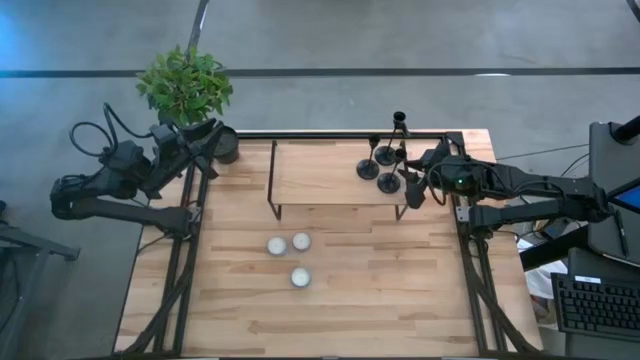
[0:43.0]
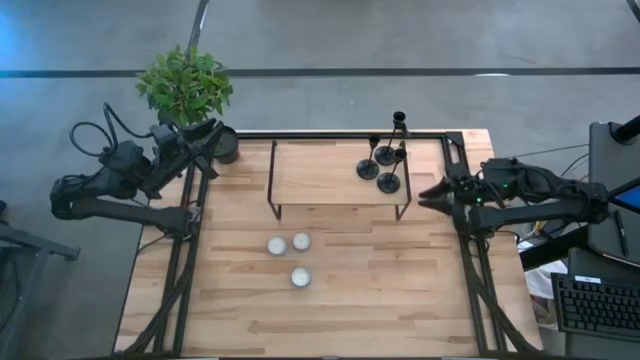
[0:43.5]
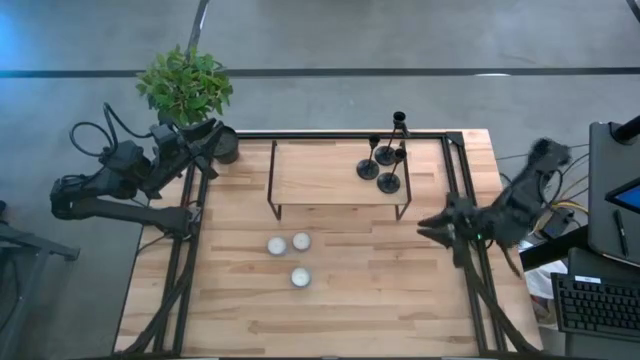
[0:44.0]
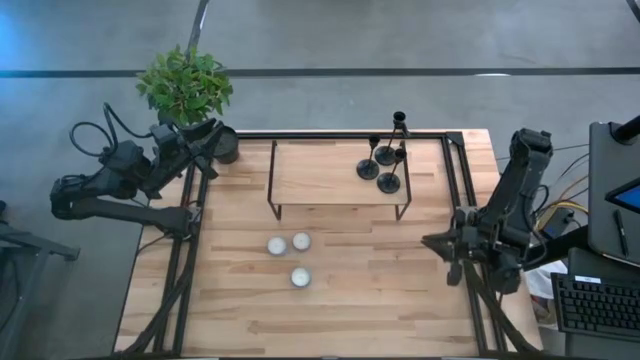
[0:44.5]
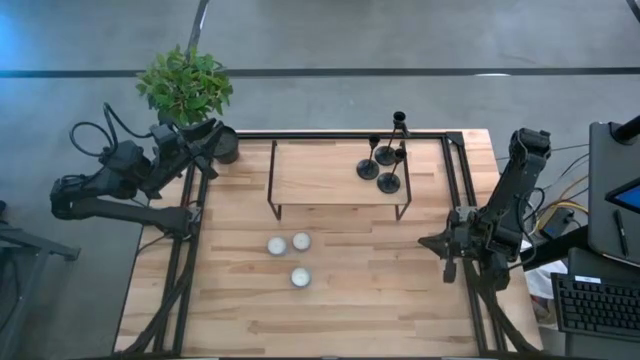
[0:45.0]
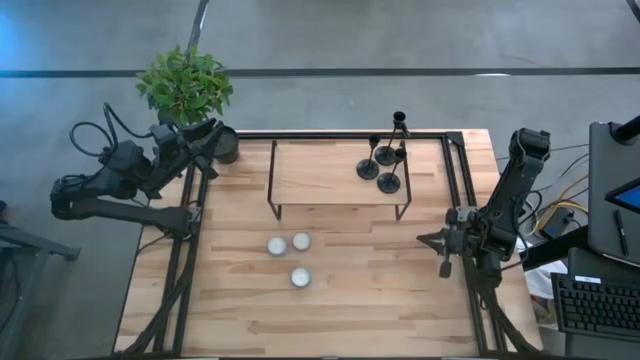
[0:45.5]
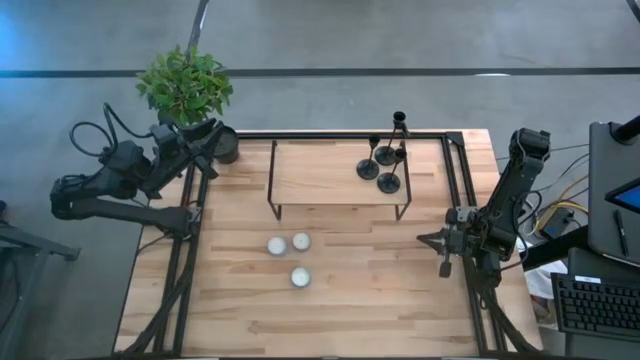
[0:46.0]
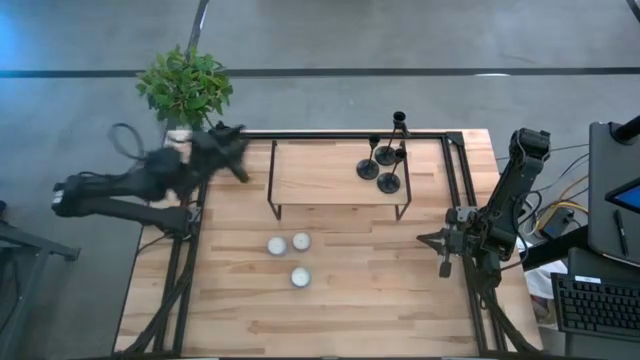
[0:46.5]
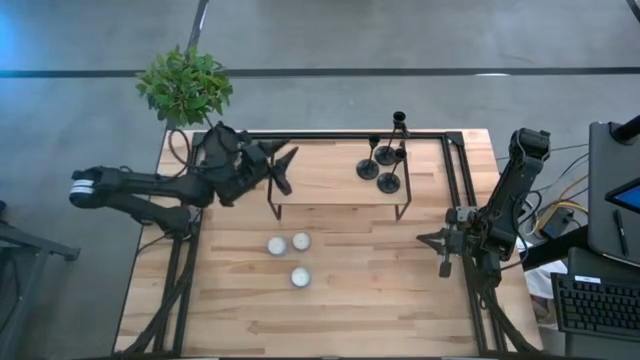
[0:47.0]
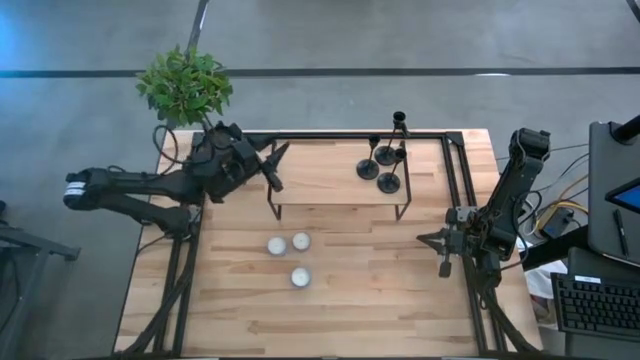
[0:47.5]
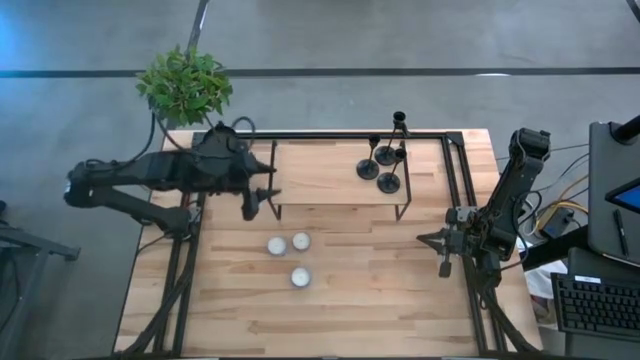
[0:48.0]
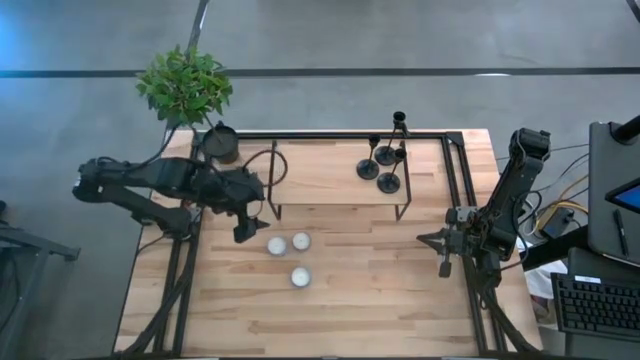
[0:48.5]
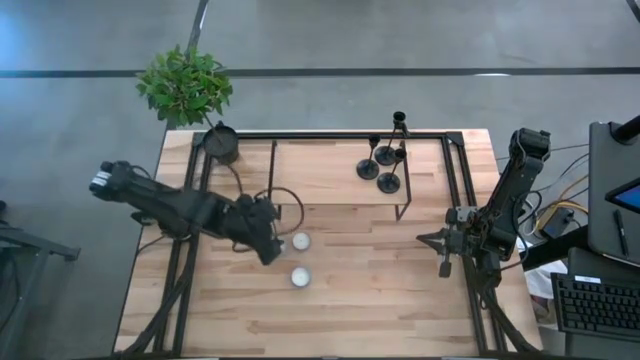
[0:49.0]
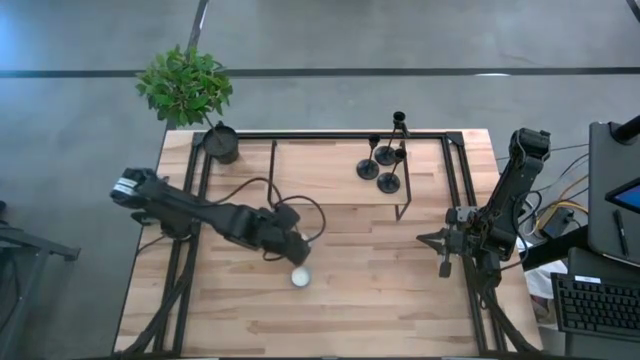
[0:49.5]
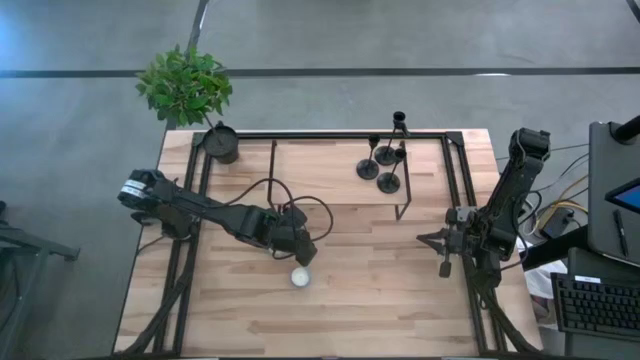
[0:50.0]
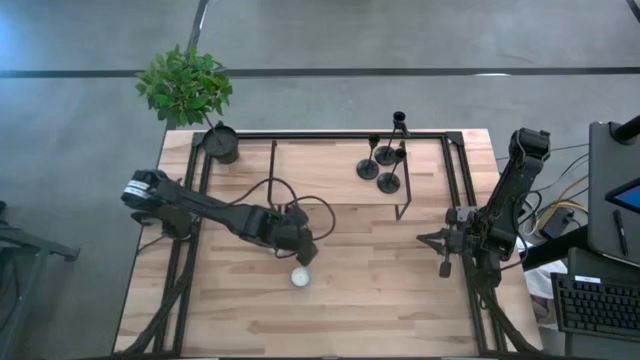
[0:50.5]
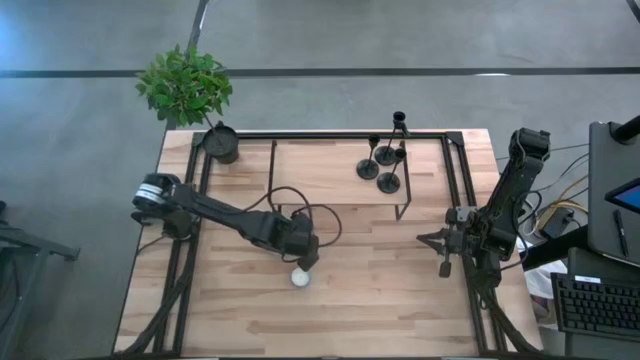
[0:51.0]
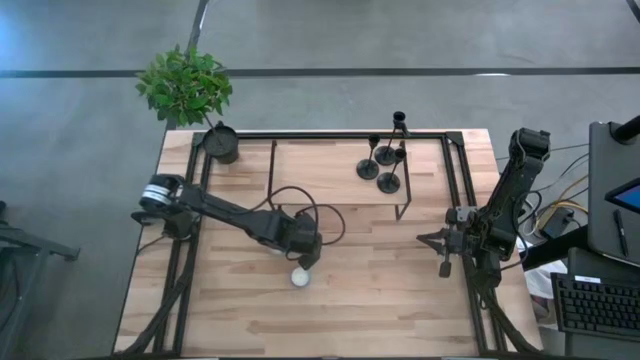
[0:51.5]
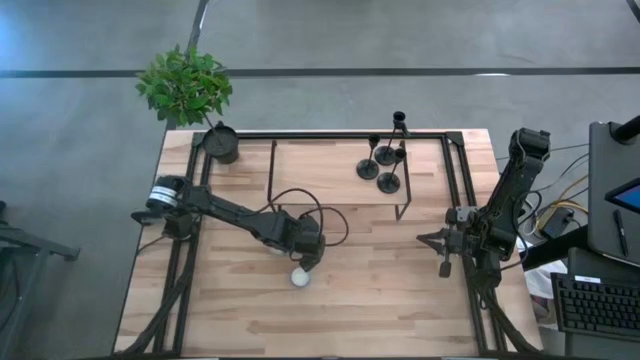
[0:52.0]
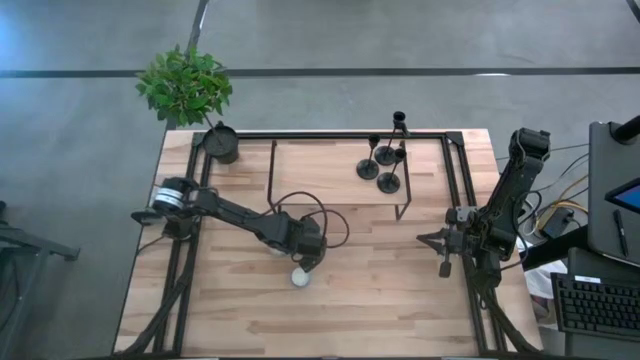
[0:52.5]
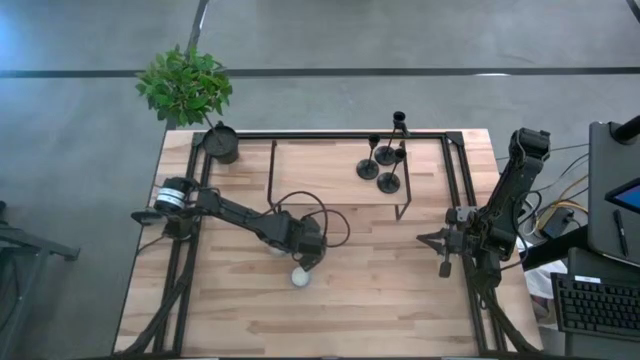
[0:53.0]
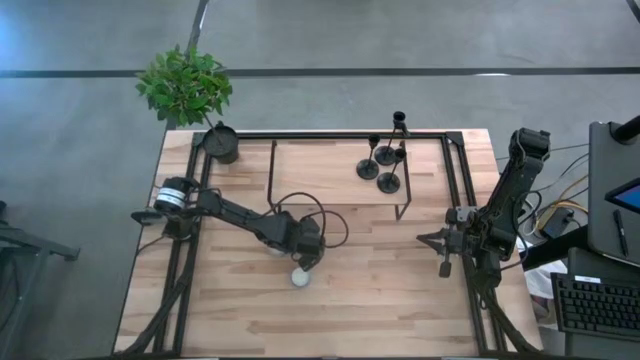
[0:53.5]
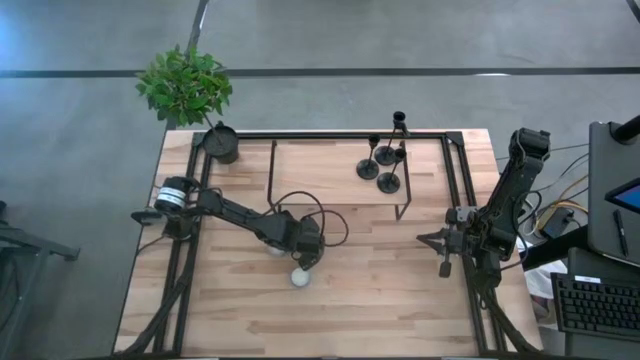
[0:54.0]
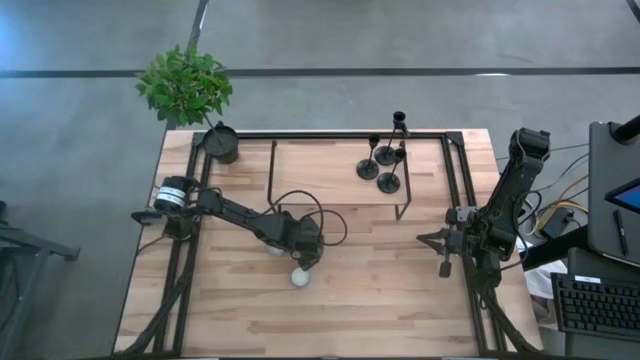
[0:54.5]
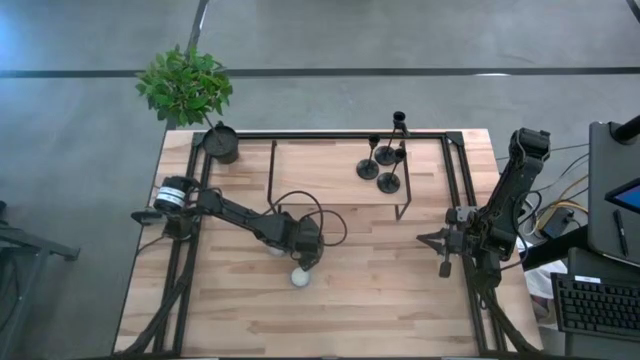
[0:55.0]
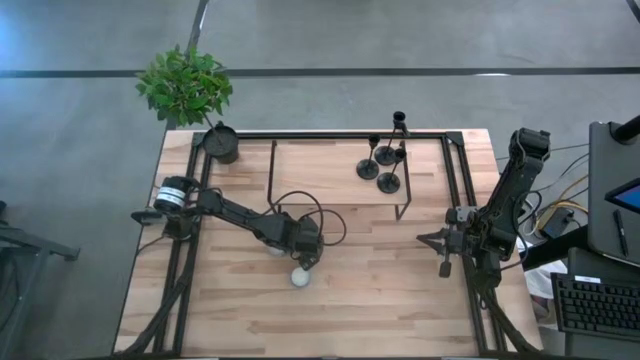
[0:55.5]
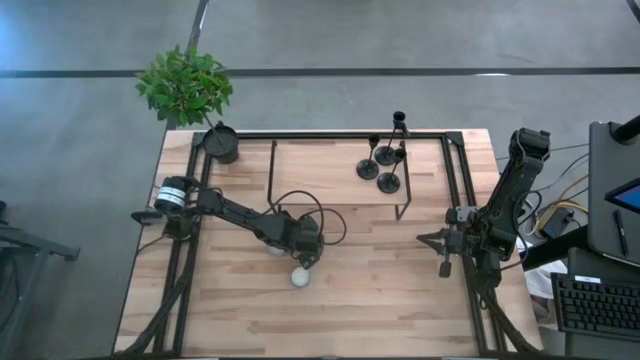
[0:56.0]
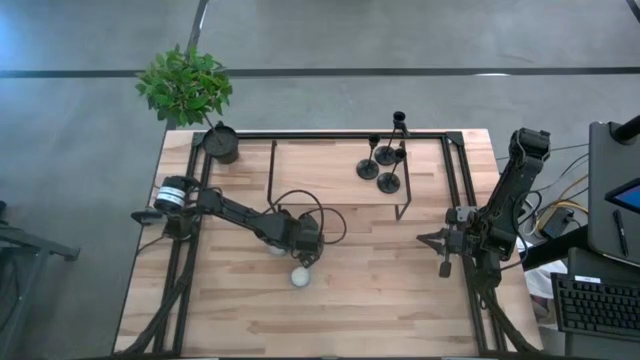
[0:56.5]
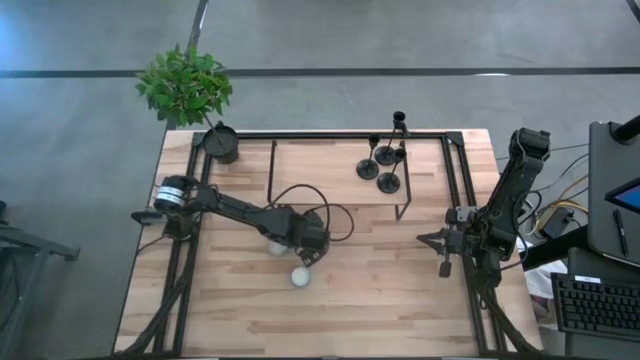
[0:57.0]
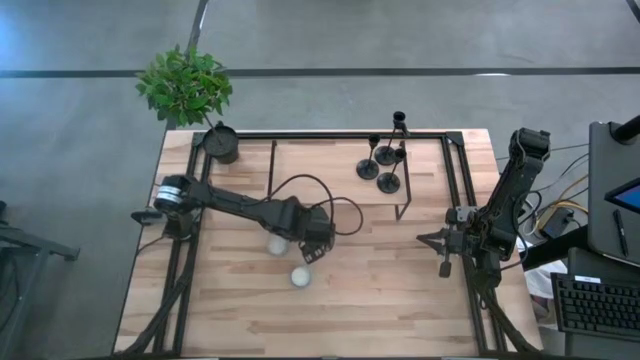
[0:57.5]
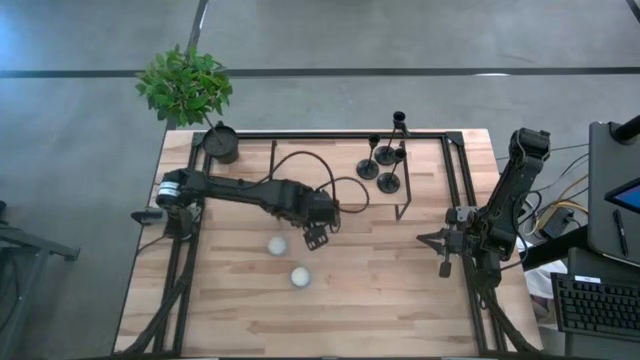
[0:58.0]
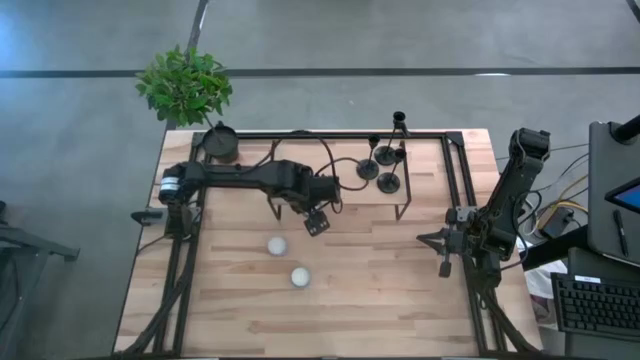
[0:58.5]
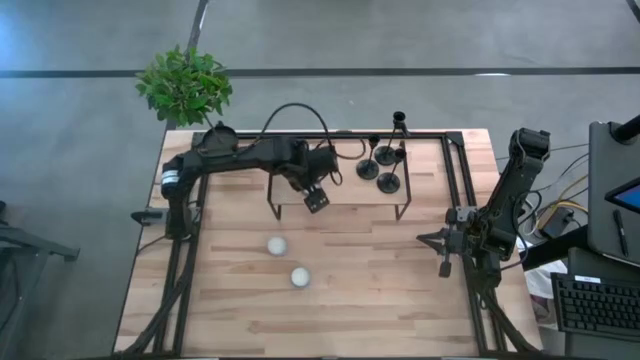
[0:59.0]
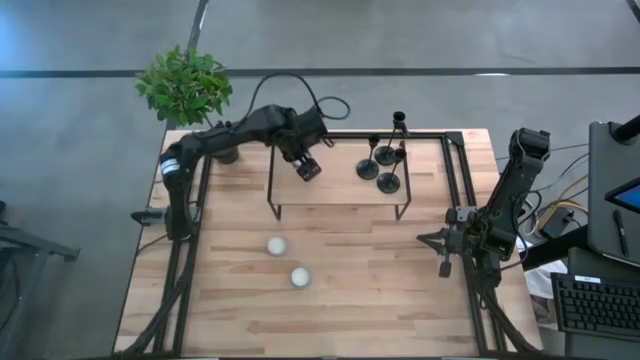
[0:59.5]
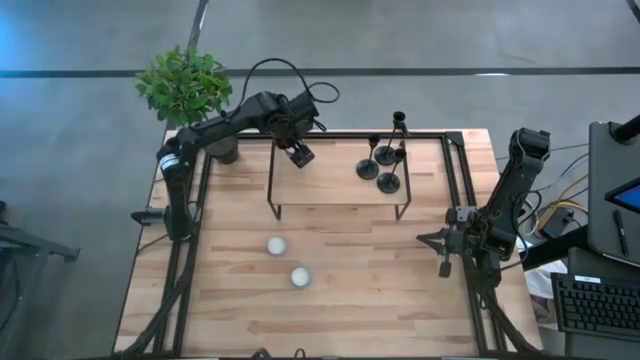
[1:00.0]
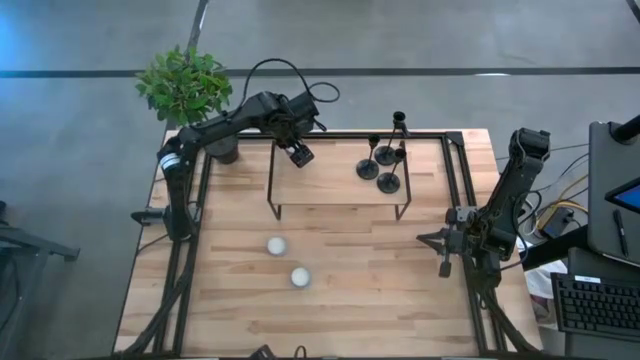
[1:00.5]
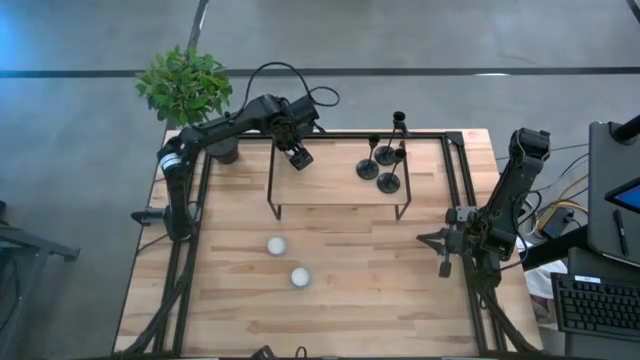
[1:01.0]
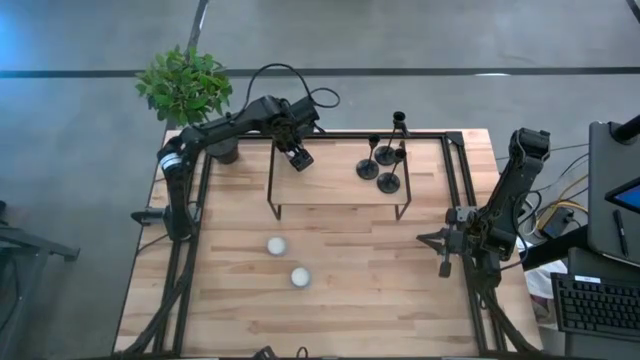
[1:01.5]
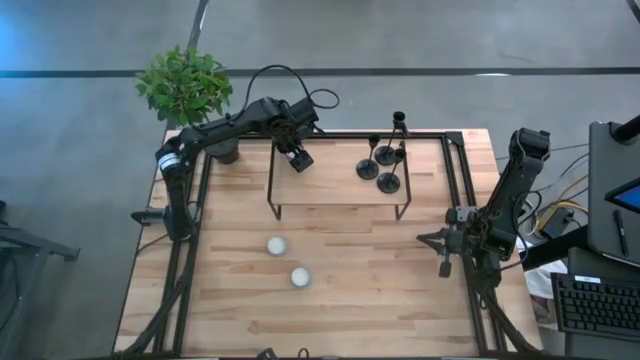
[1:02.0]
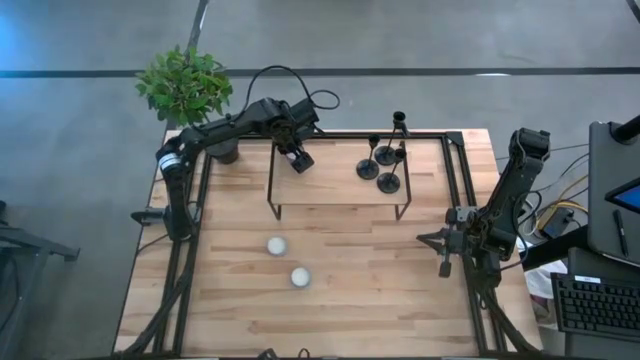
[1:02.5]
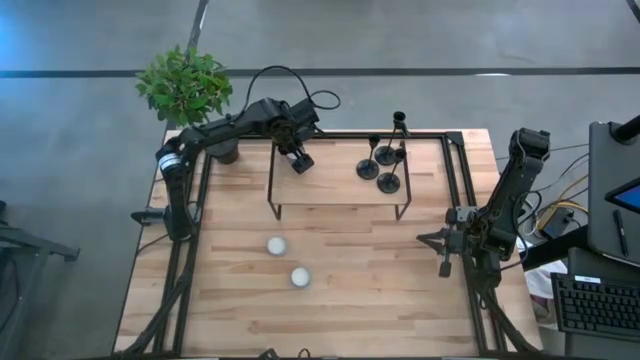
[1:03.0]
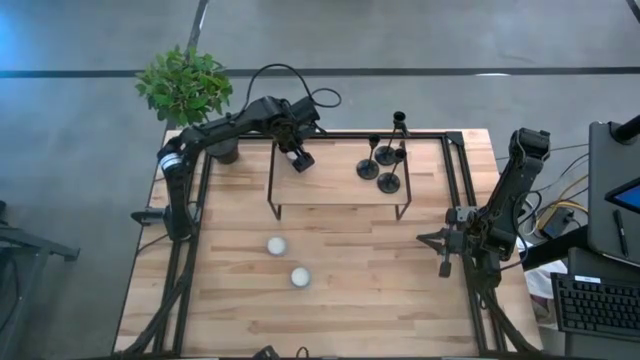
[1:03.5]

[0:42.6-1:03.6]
Task: Pick & Place candle stick holders
Put the pink scented candle on the shelf

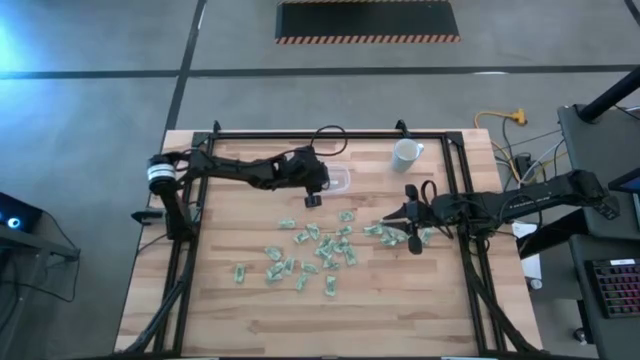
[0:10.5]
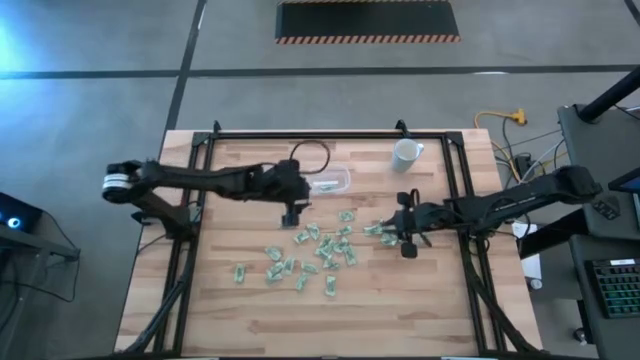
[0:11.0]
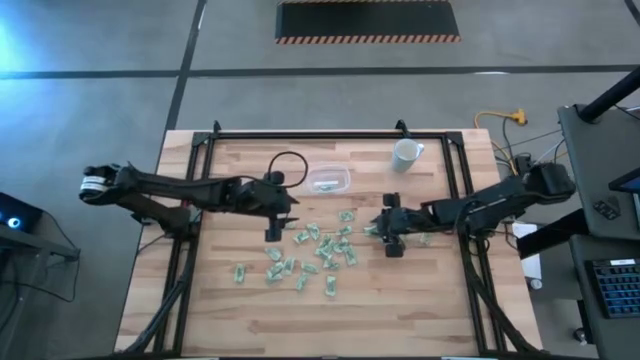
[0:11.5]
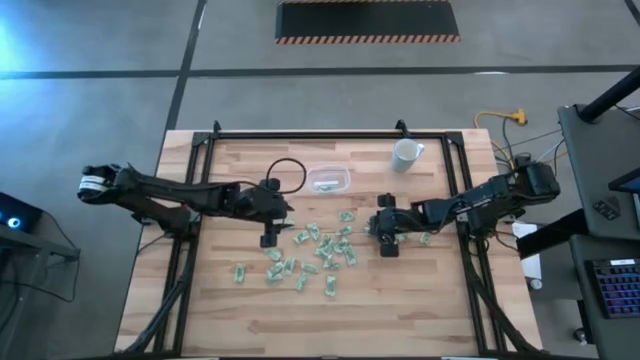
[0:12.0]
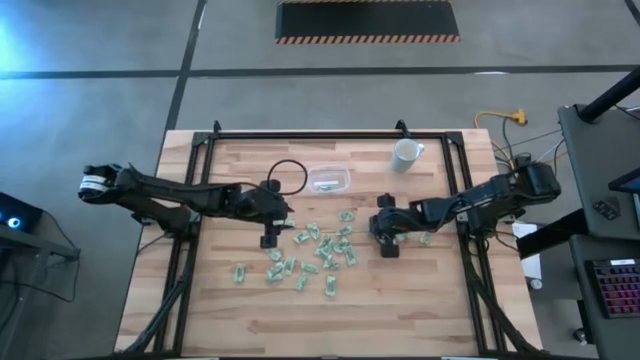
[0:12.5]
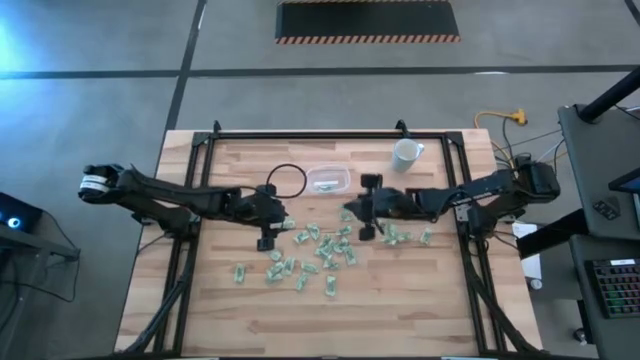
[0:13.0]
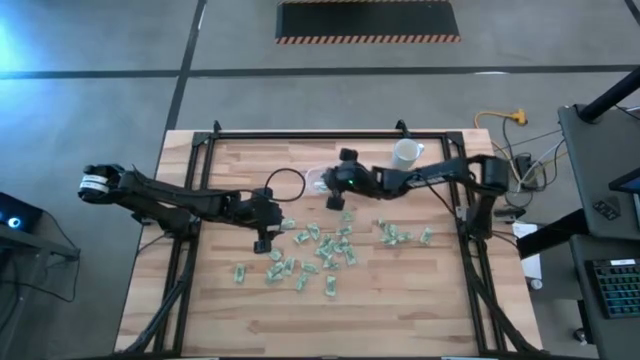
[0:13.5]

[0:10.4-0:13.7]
Task: Pick and place Stevia / Truvia into bins
Put the stevia packet into the transparent container
